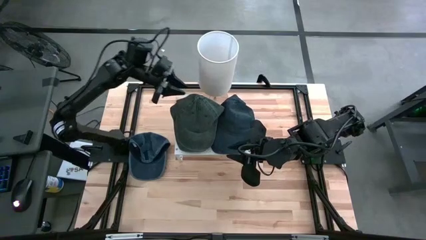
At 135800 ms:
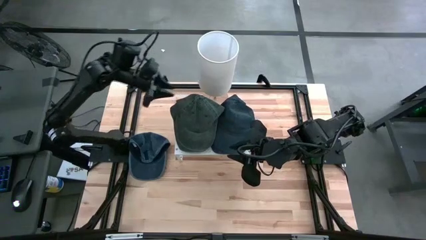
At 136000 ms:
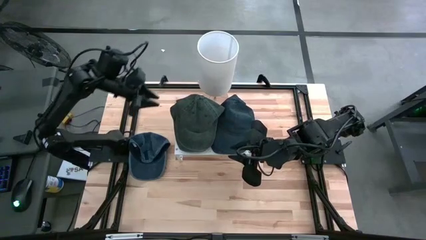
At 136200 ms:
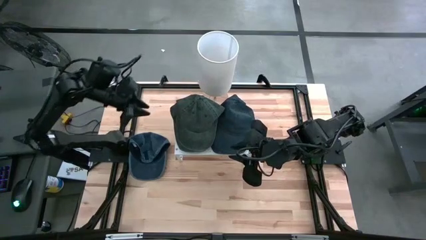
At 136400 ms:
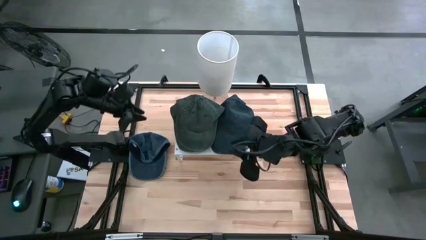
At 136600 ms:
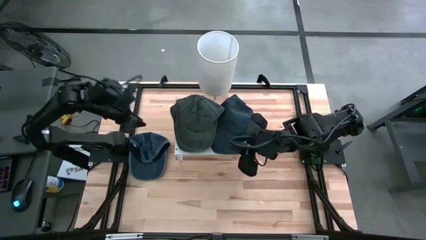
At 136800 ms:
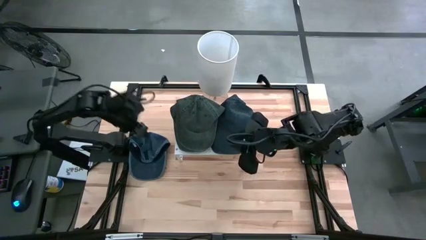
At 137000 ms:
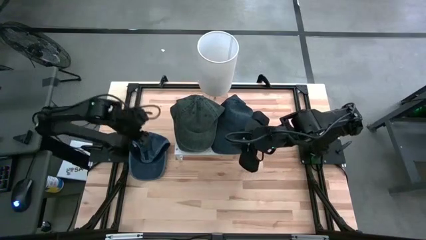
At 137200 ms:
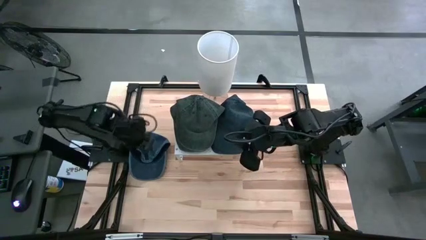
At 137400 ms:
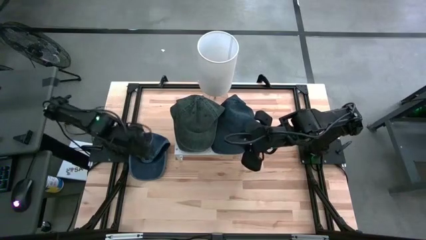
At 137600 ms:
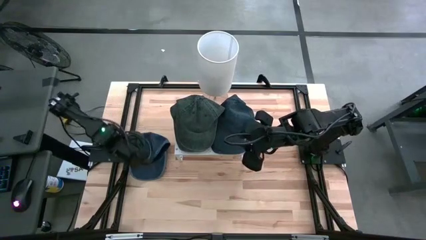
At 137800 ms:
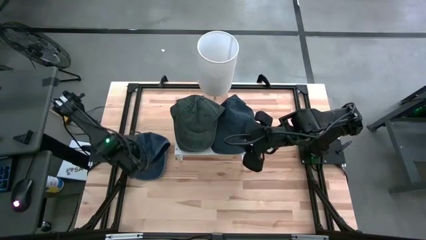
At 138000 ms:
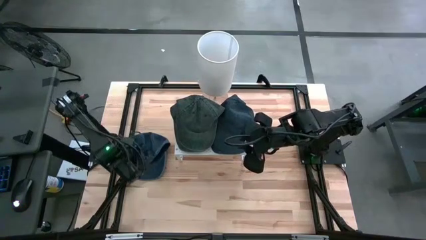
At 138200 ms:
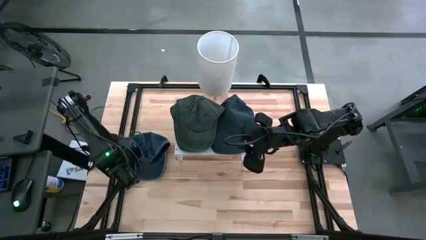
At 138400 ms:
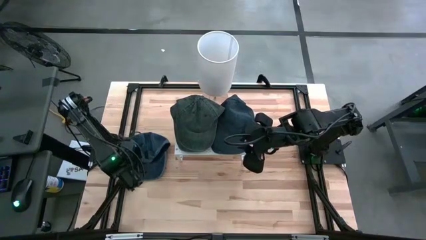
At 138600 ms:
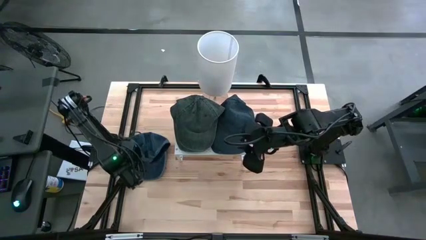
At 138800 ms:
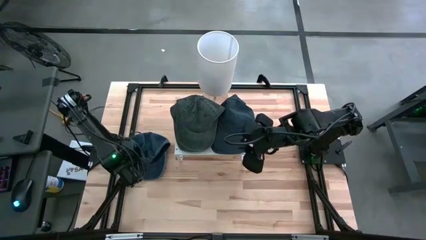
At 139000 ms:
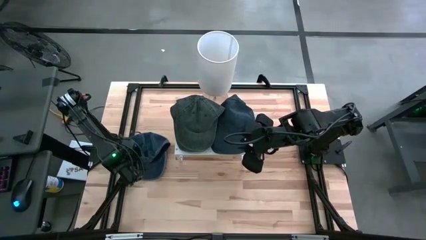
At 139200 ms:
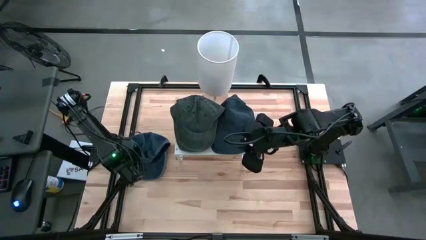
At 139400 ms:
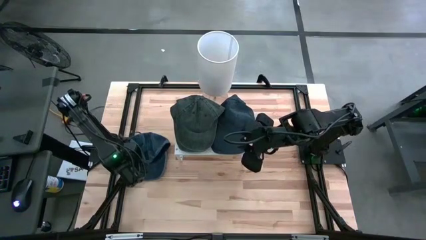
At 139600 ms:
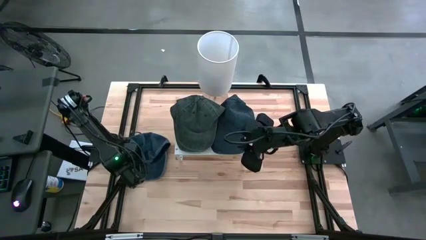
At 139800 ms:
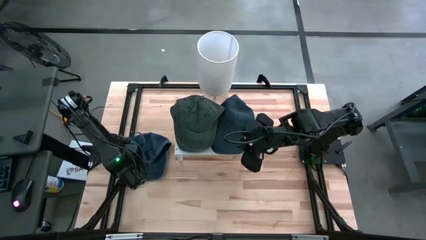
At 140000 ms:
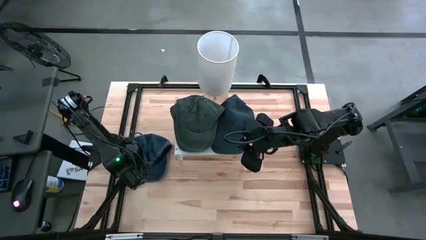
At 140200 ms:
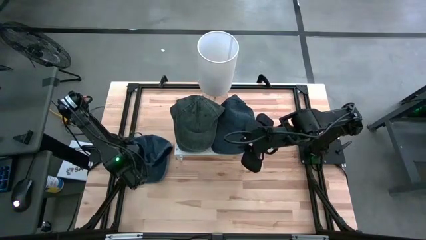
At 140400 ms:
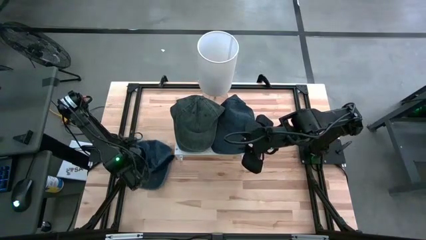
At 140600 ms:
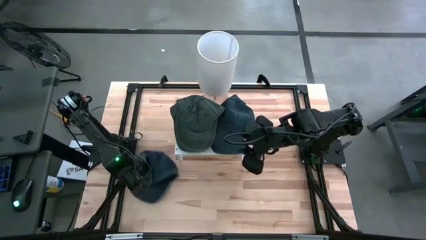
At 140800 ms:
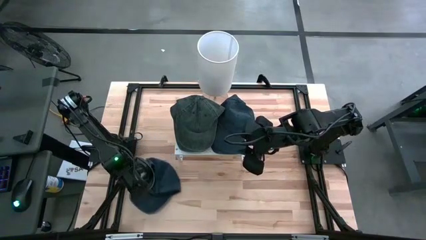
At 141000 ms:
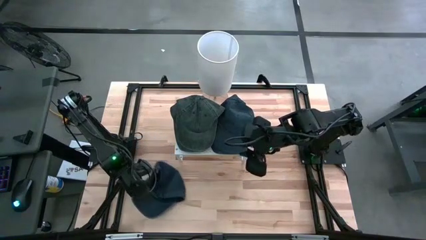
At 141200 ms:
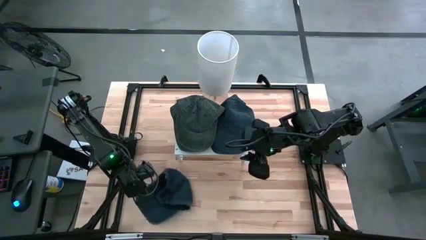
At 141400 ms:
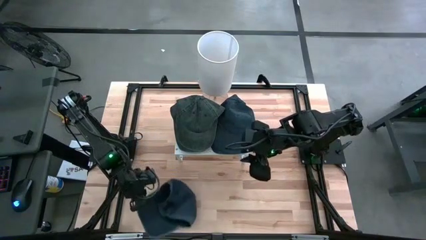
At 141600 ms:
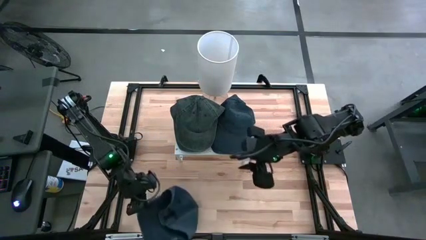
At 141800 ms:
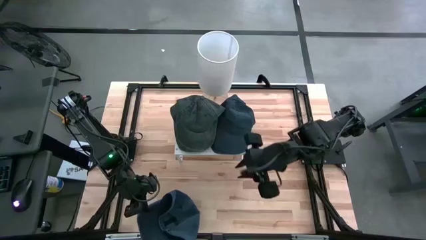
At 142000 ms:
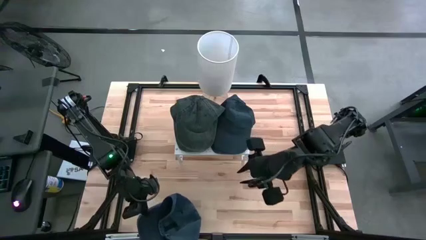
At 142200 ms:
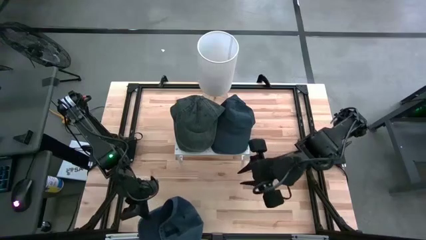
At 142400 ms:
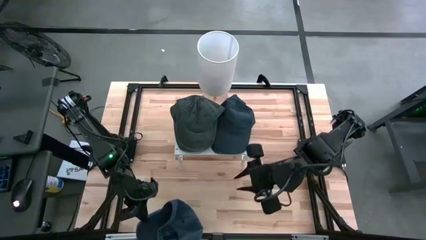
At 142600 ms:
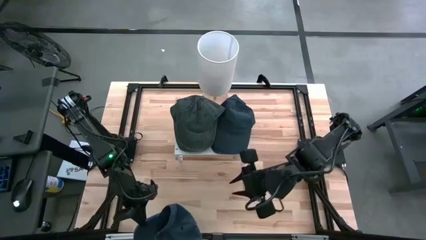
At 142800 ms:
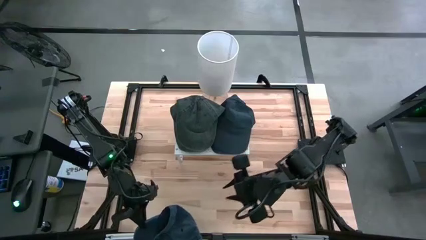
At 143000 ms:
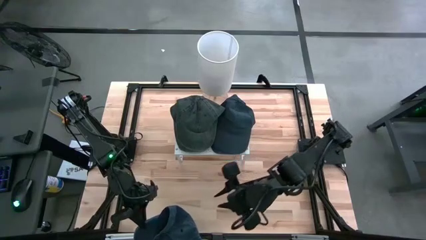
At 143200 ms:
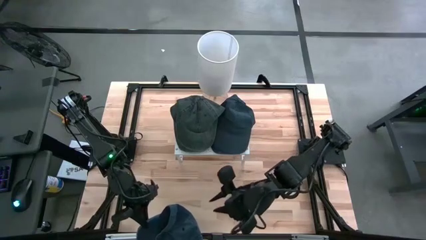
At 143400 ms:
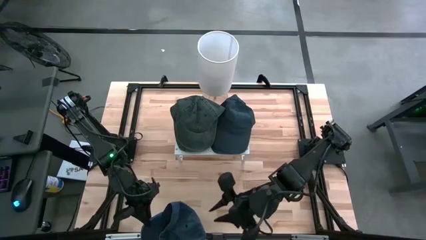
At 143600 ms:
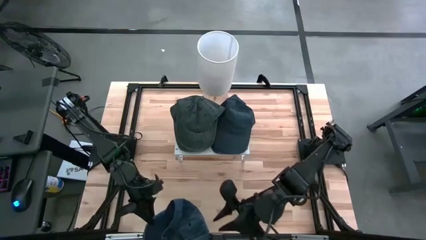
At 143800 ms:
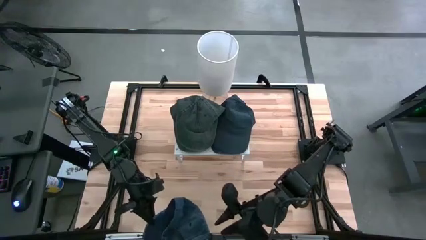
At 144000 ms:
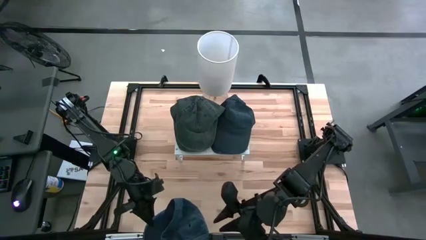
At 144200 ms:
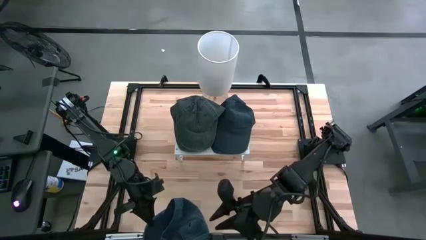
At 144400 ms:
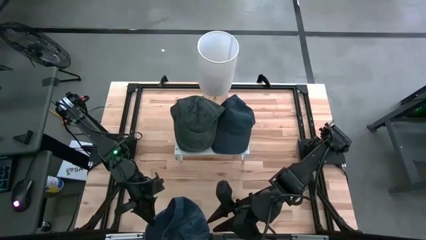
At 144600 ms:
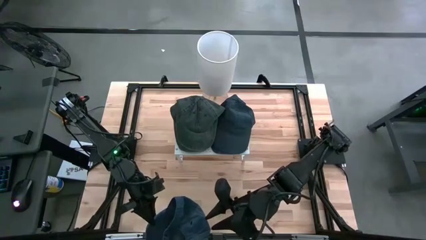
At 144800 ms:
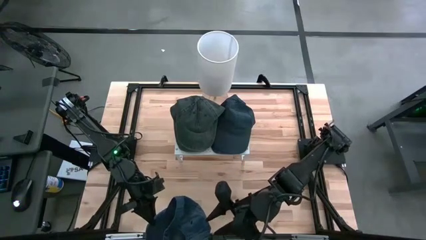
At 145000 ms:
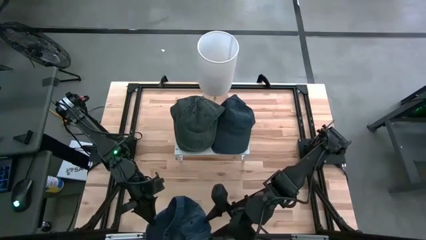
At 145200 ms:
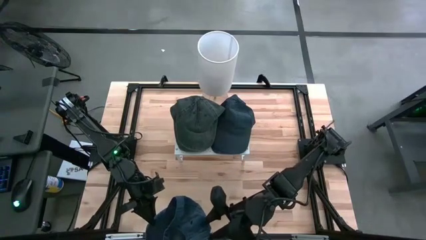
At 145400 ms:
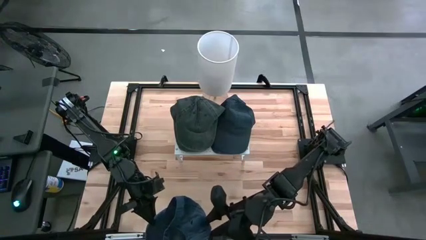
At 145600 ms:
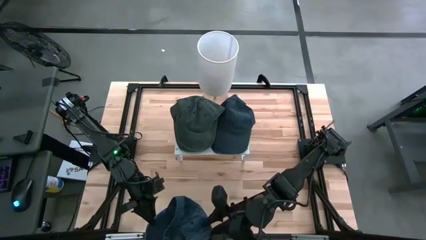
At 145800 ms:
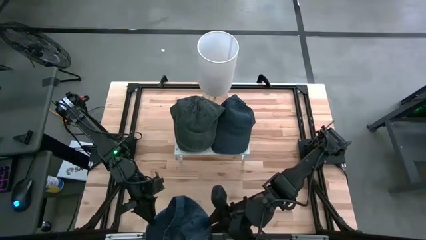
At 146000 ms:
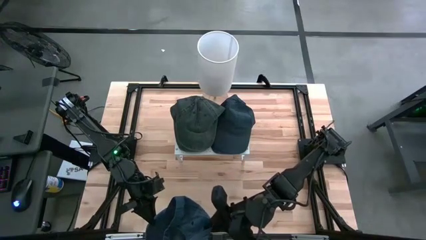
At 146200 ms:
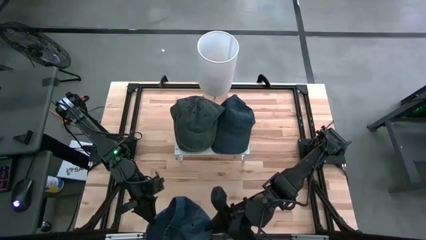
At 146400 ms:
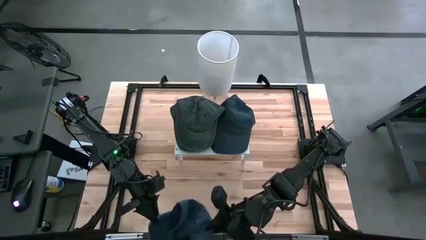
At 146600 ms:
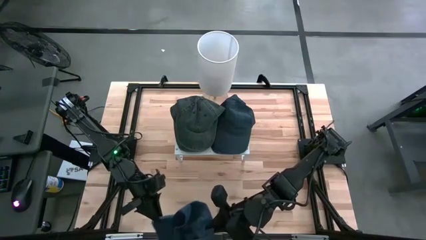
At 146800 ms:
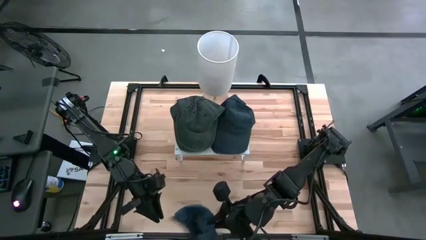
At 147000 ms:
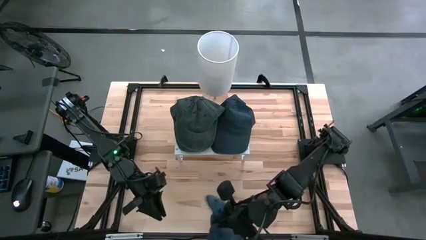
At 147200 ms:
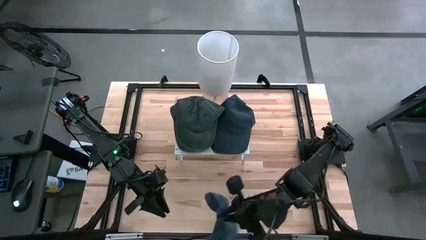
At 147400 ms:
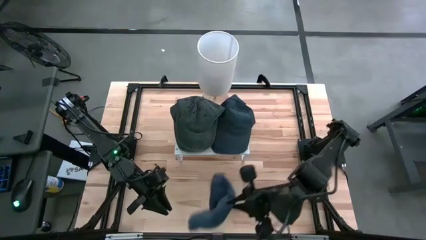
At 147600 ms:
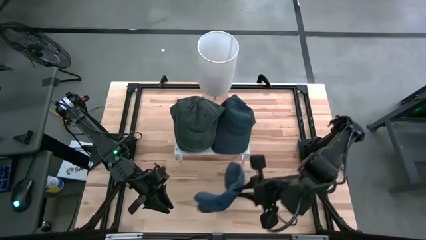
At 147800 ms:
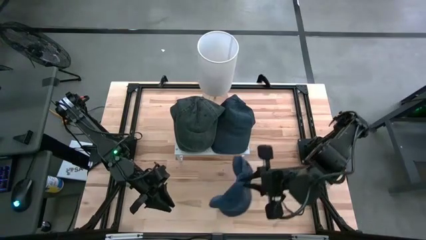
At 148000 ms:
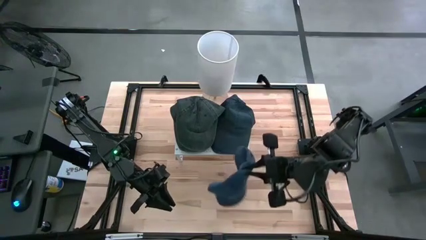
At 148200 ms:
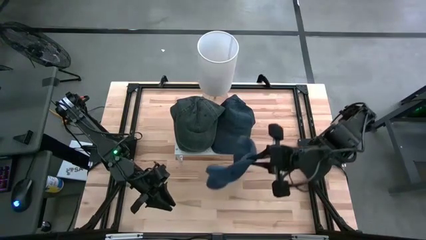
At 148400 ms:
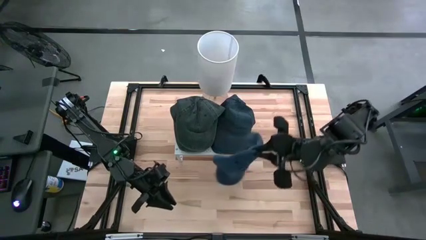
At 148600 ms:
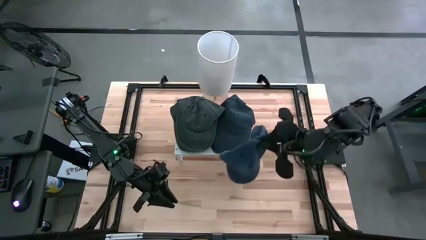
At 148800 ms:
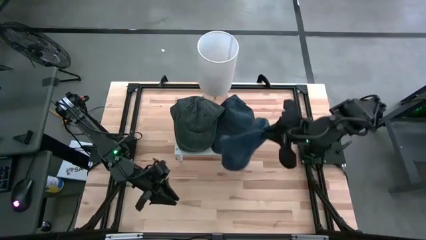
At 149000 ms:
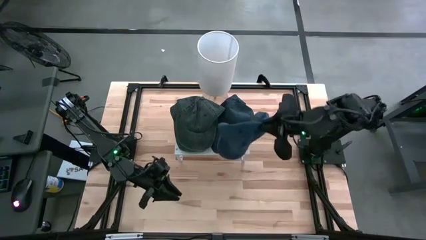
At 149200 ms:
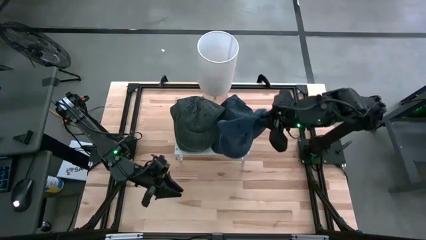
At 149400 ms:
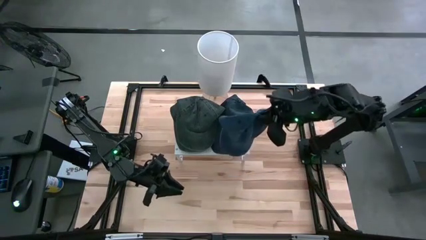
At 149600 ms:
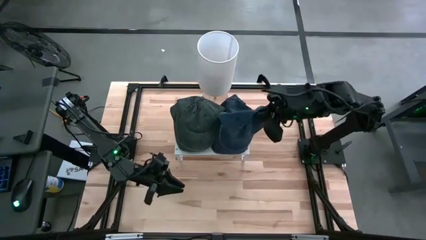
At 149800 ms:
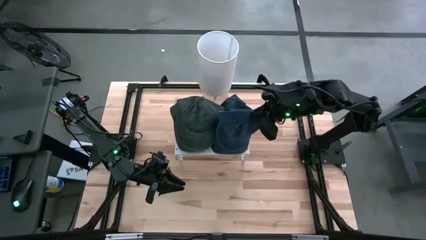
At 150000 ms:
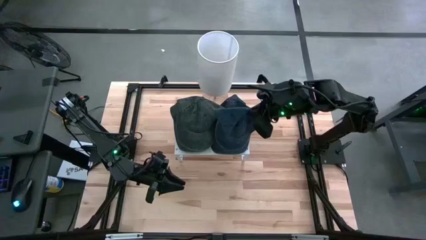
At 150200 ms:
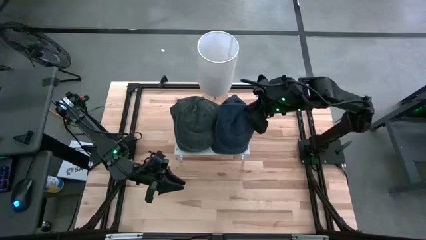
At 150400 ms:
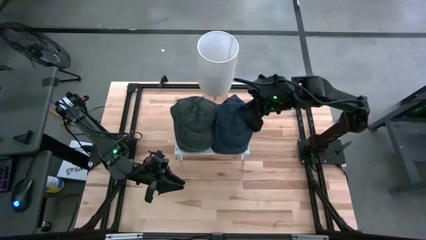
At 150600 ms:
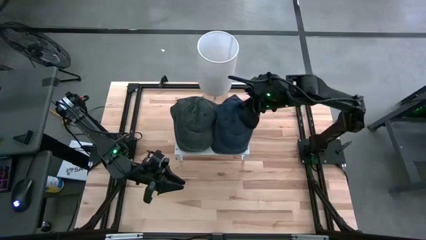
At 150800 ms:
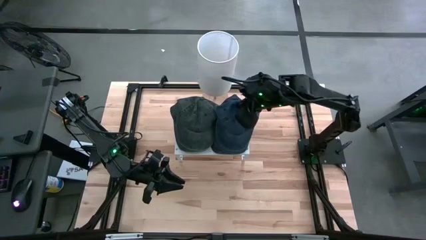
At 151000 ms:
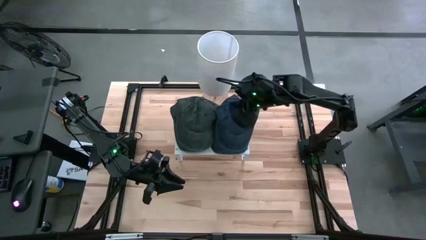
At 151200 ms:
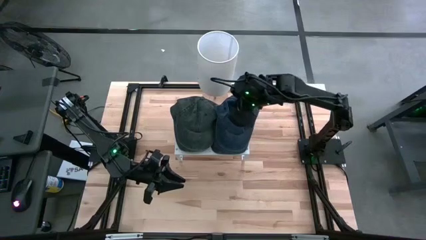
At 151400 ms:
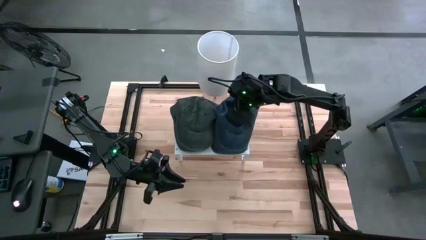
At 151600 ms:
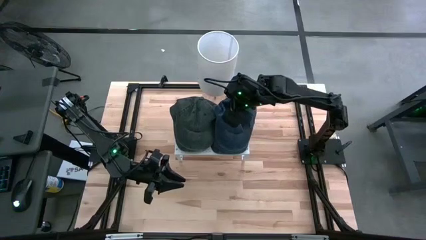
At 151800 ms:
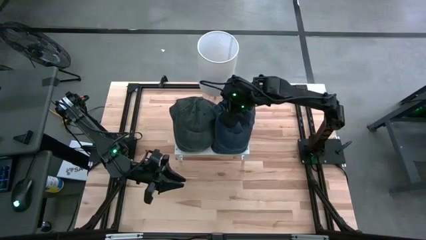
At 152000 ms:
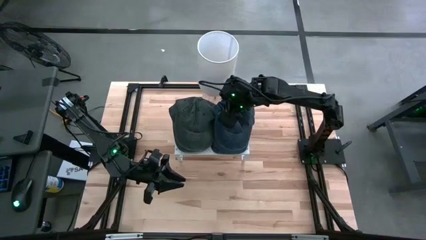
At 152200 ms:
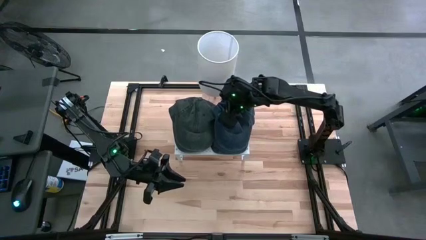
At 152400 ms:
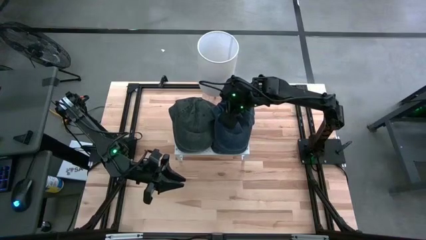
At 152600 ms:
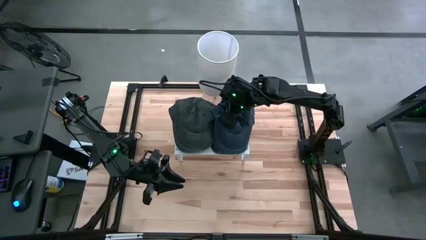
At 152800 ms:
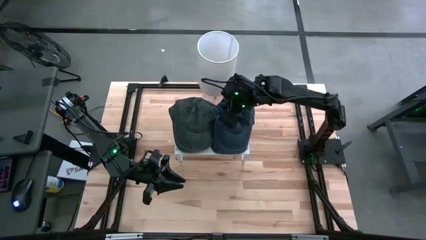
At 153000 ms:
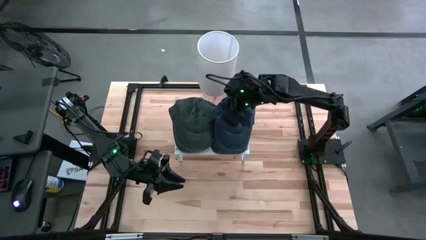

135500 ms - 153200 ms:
Task: Pick & Place hat
Stack the blue cap on the blue cap on the shelf
